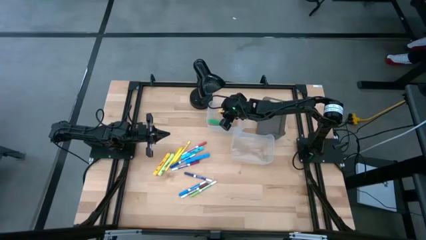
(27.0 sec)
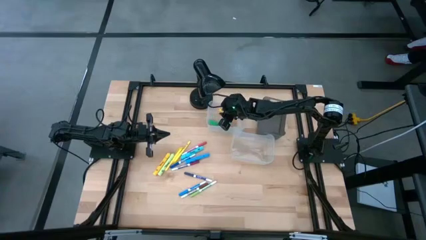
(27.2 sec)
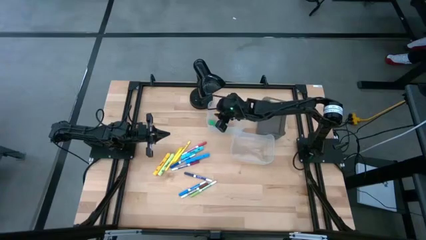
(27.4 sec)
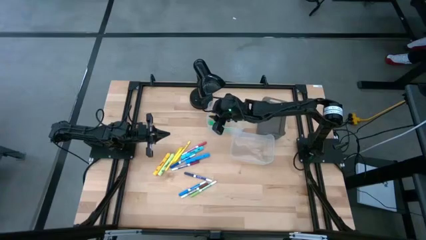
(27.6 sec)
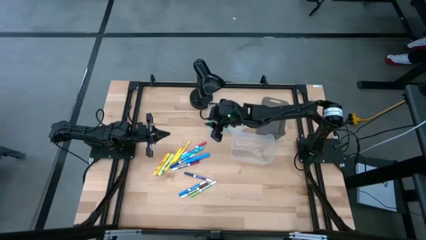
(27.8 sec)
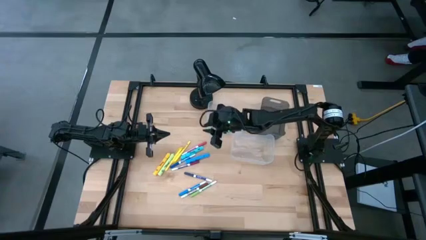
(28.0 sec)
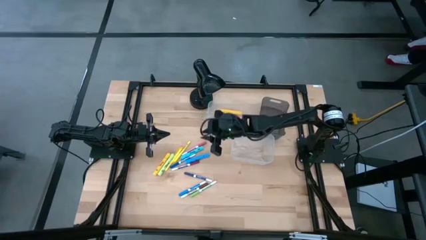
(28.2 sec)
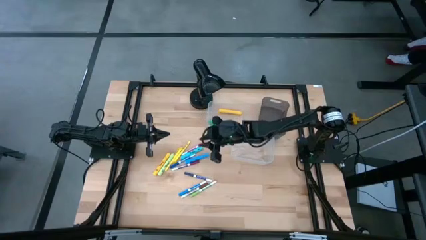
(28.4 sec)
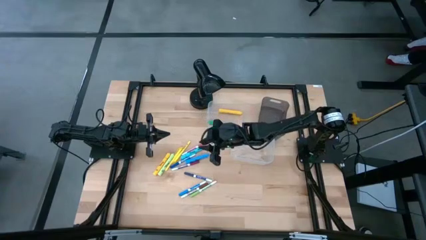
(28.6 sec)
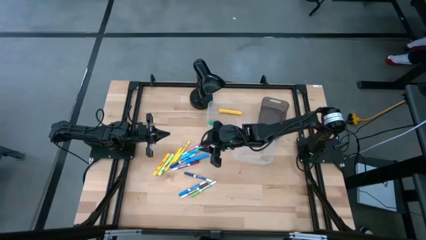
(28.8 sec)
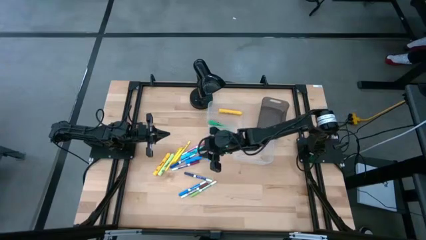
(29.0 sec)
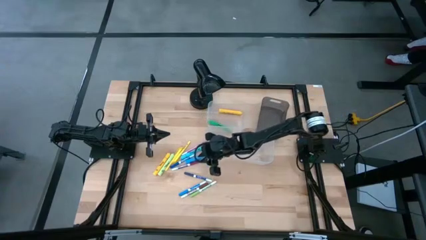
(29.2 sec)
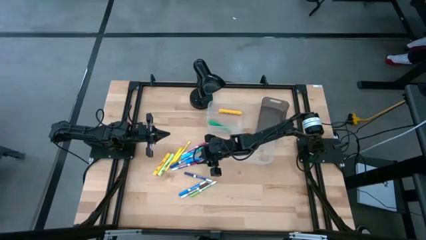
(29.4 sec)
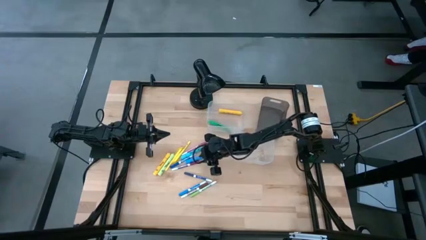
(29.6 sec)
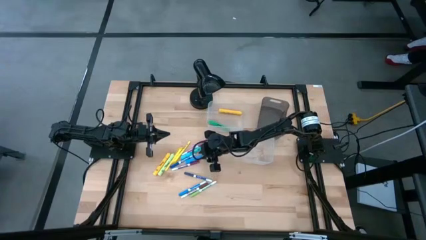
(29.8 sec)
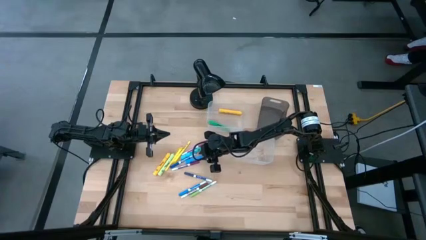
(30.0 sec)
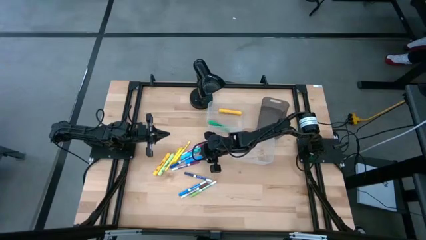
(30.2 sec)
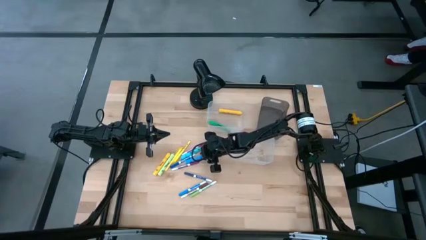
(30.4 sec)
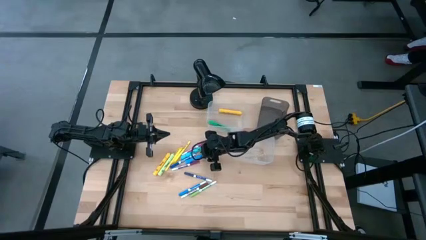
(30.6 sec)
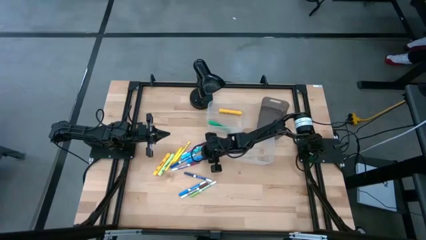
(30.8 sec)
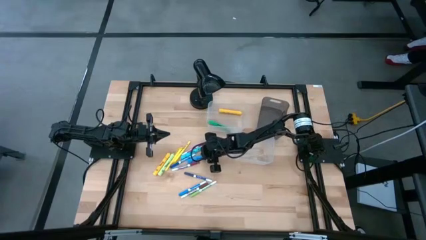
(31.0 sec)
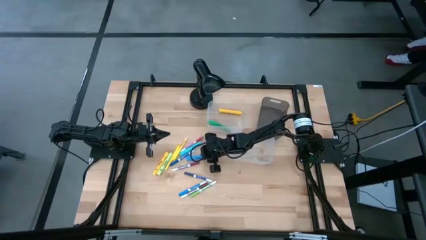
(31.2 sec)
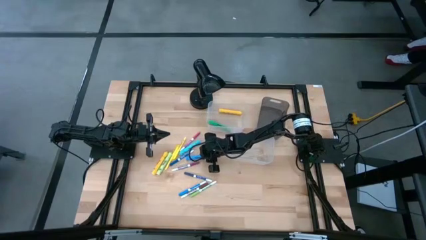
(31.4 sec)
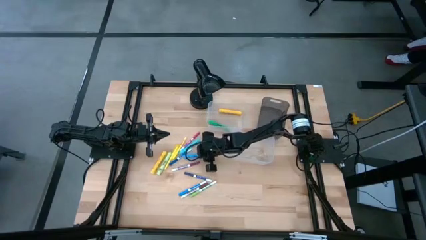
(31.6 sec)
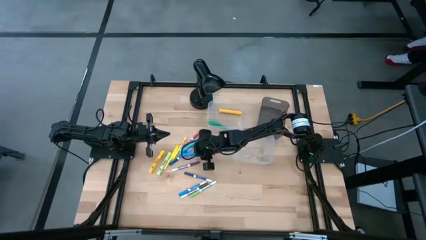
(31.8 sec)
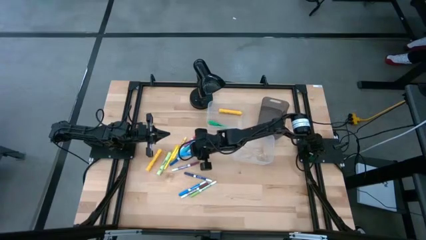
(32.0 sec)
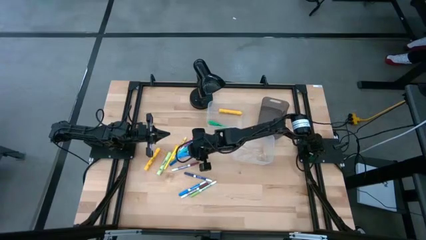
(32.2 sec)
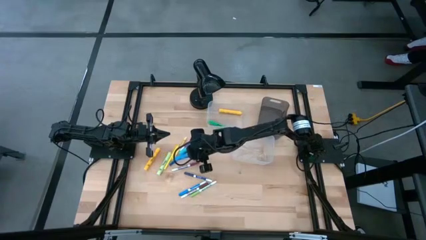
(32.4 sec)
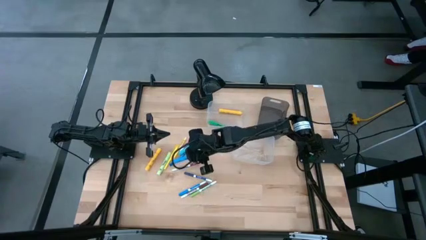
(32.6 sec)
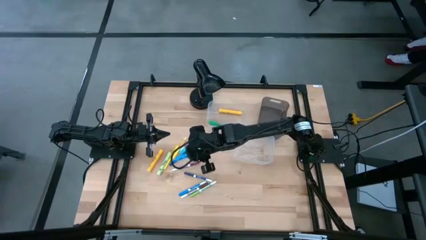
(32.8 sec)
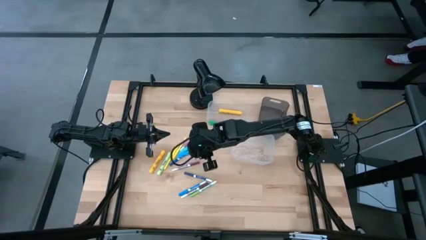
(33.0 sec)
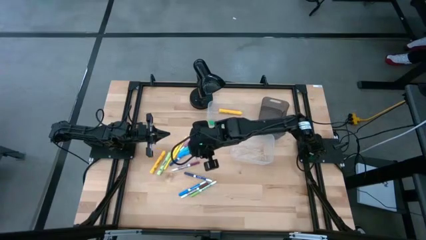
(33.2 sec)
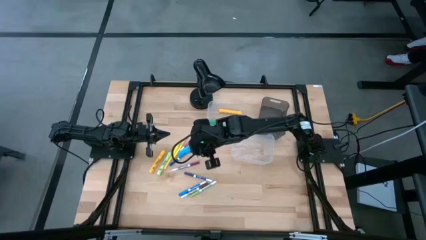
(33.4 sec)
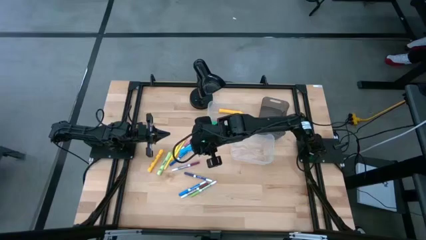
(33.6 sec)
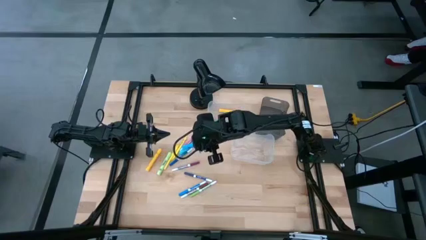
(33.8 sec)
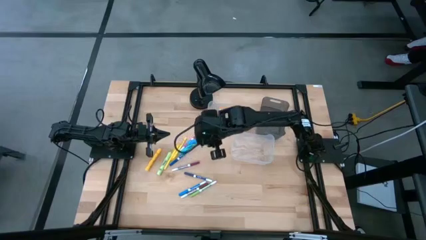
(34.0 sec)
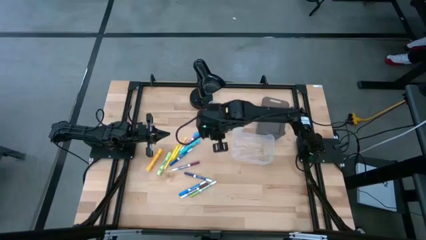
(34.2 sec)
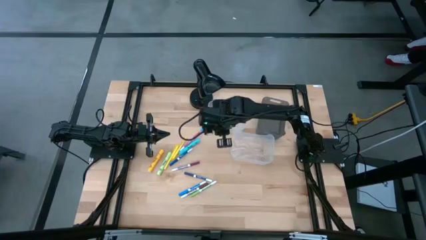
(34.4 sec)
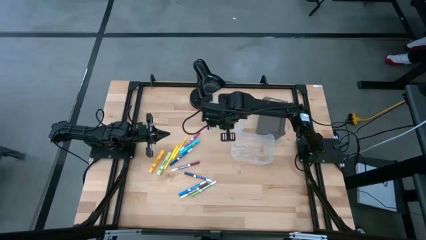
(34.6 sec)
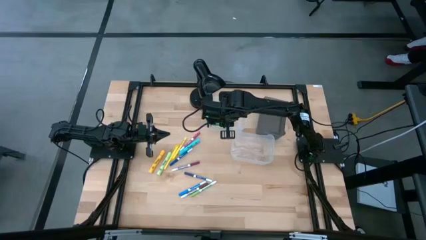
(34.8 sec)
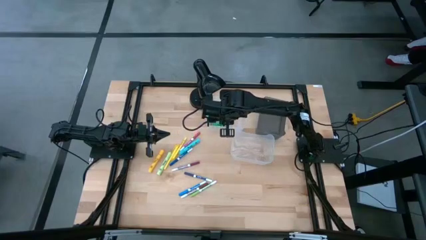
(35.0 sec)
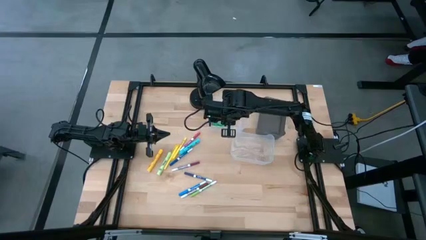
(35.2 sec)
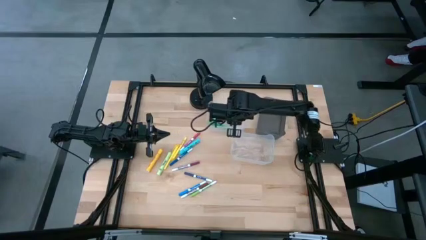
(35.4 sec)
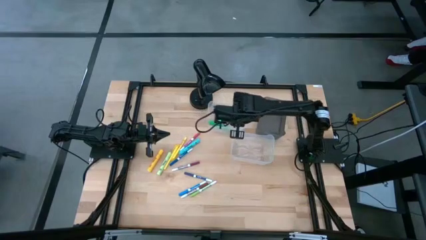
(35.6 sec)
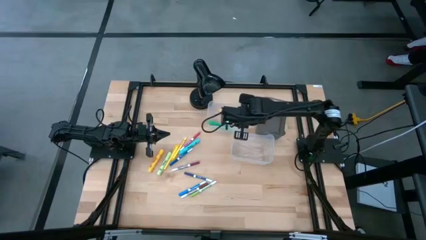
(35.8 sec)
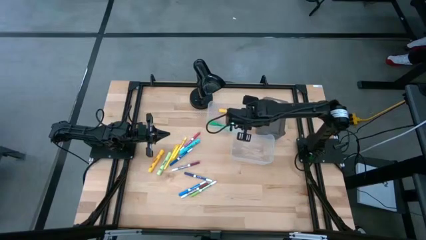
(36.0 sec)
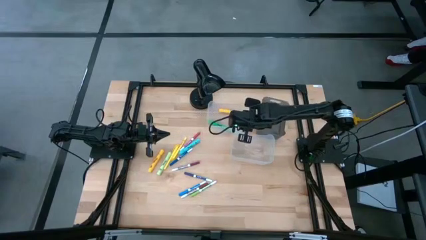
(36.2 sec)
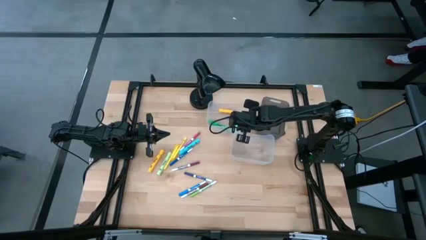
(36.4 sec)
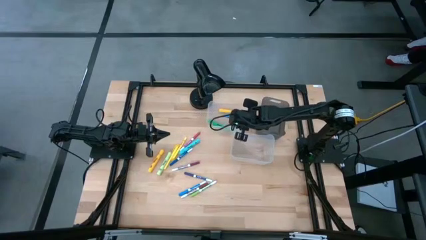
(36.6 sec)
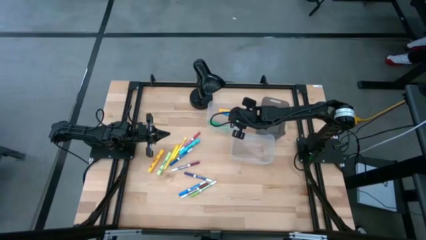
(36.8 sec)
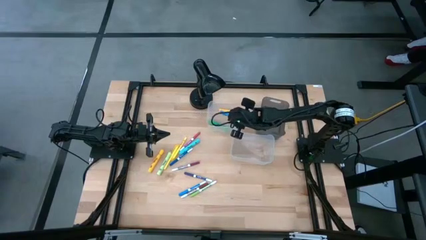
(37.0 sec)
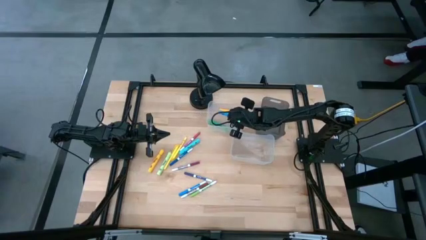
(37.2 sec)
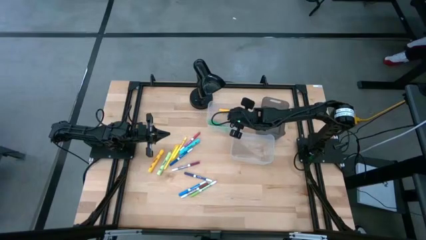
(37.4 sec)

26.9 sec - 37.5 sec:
Task: Pick & Place Markers
Put the blue highlighter pen into the top transparent bin

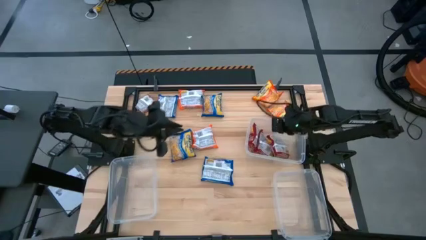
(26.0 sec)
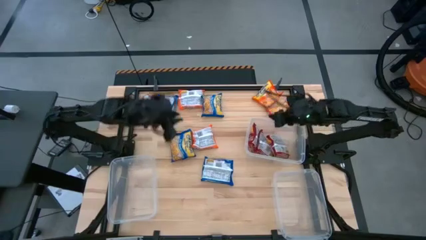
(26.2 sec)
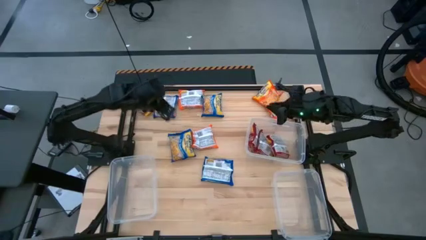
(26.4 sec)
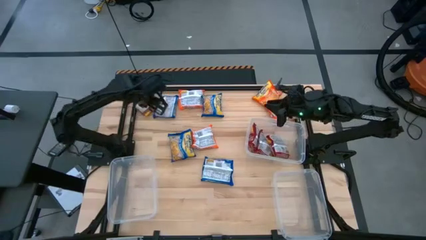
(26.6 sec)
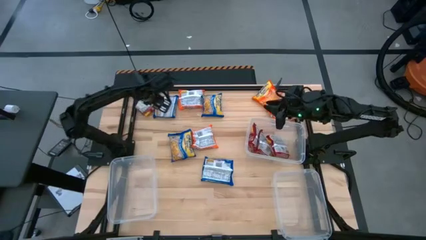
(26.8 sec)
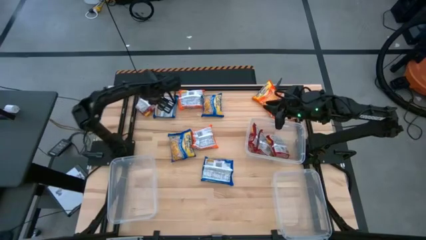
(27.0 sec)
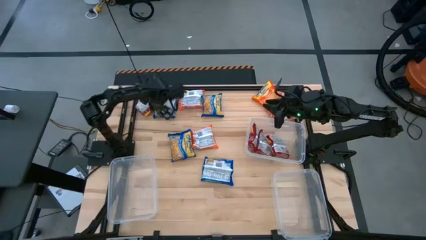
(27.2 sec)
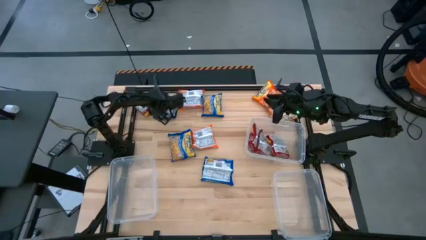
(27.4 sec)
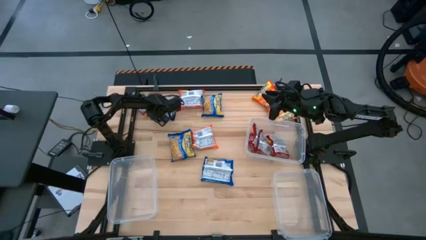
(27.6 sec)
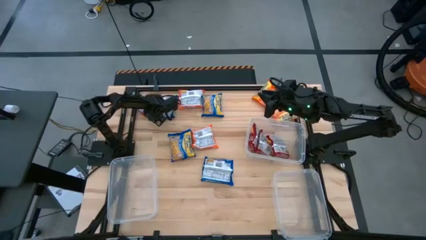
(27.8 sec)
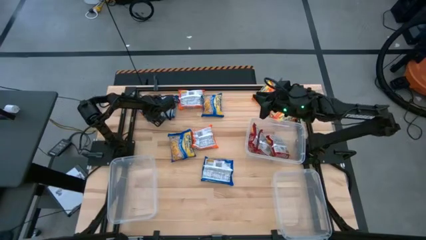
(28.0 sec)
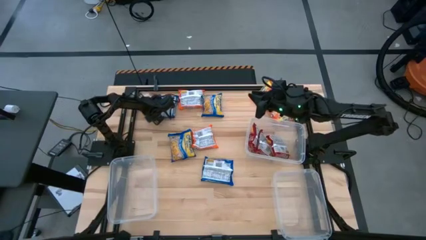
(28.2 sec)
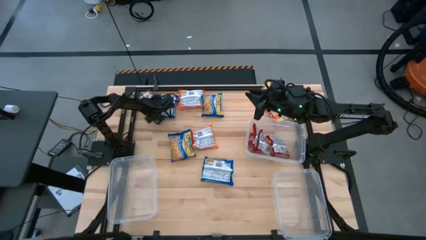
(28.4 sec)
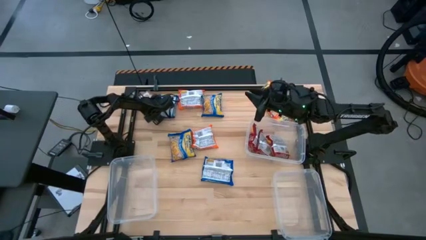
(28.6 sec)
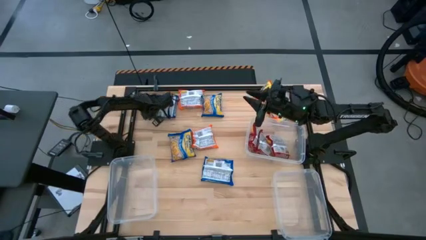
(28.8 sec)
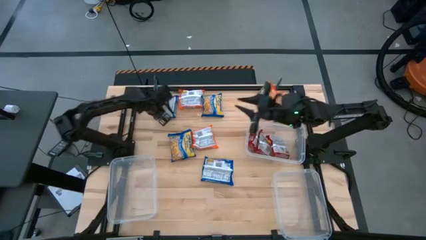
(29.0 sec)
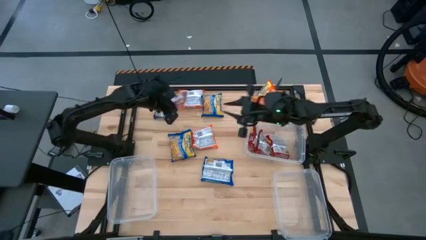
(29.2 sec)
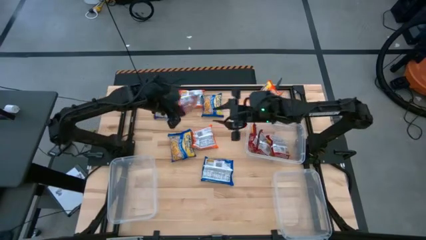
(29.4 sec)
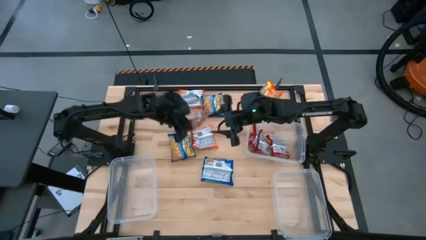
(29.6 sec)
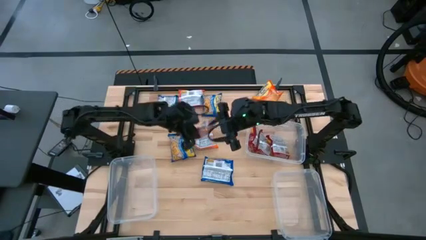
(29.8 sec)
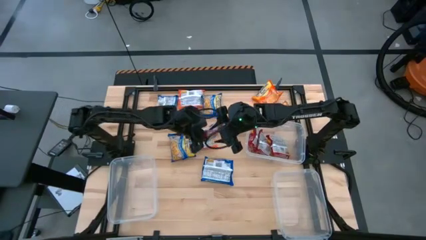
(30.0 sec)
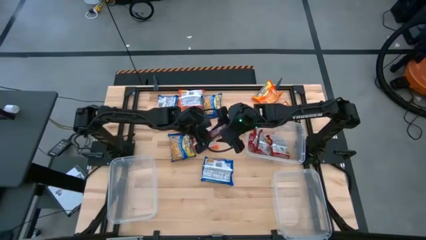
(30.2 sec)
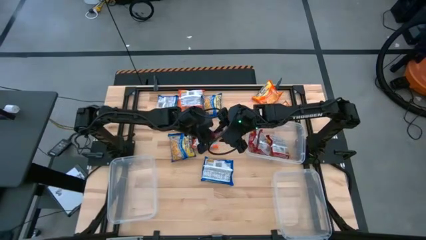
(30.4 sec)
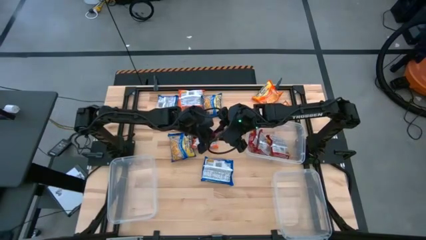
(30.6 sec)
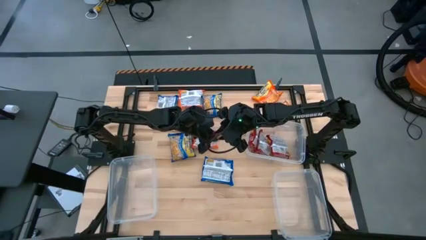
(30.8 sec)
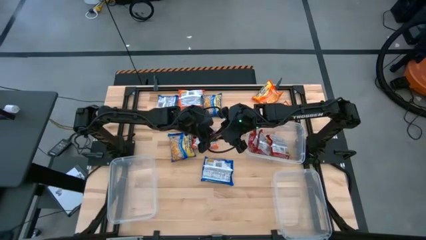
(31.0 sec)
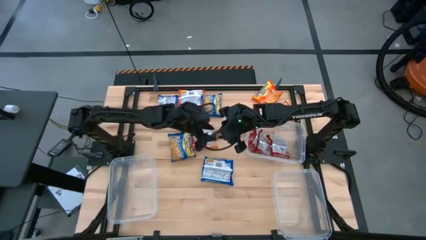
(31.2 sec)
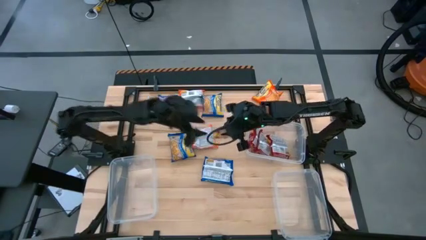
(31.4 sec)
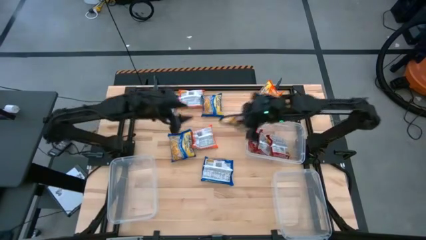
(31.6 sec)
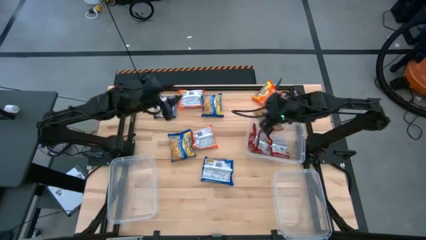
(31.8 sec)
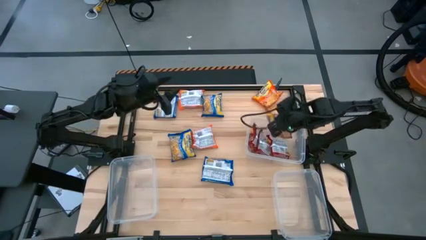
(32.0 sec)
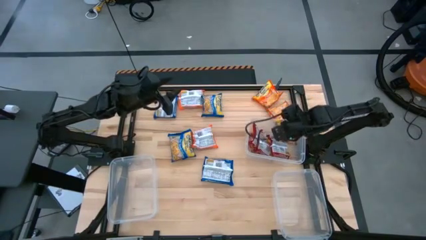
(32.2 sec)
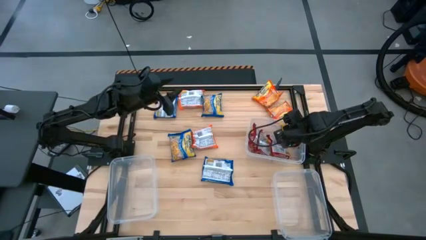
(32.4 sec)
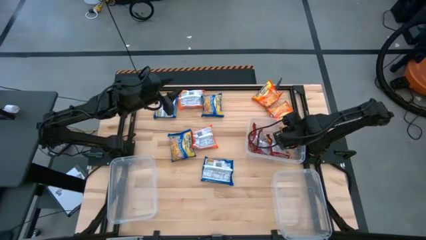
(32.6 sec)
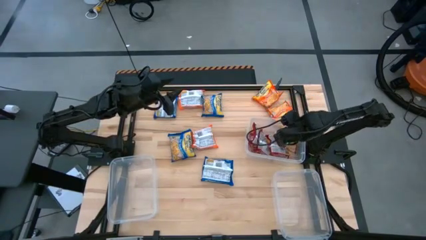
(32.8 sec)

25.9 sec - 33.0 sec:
Task: Sort Maruchan noodles
Put the red noodle pack into the top right container
